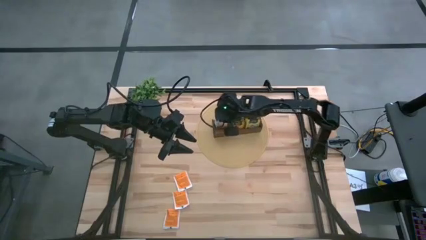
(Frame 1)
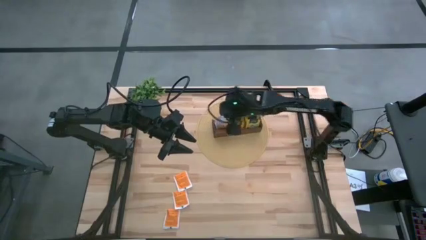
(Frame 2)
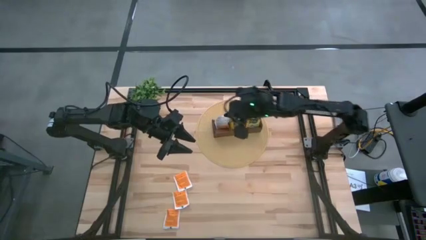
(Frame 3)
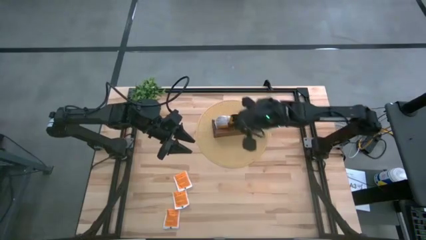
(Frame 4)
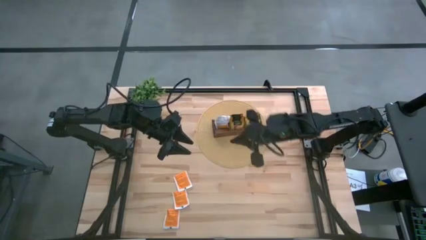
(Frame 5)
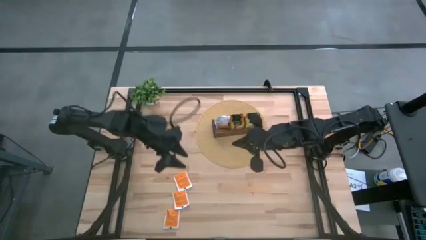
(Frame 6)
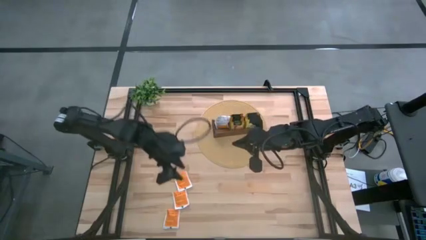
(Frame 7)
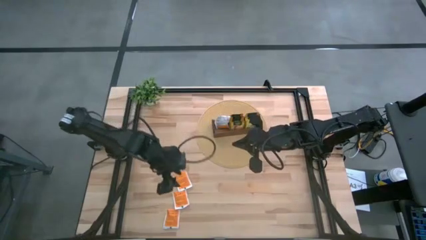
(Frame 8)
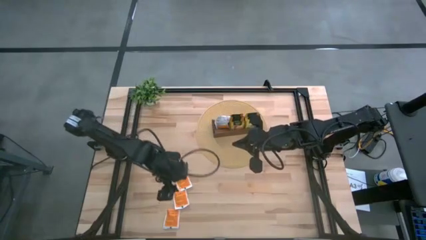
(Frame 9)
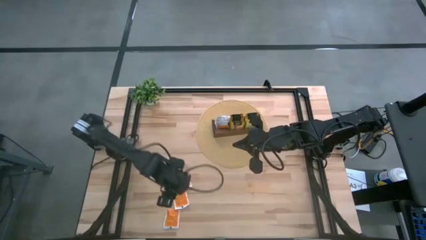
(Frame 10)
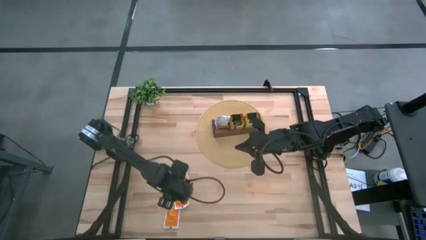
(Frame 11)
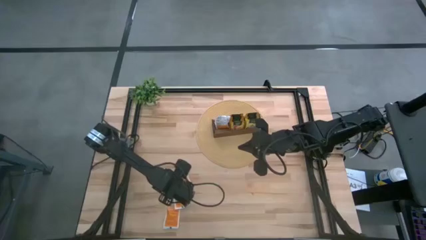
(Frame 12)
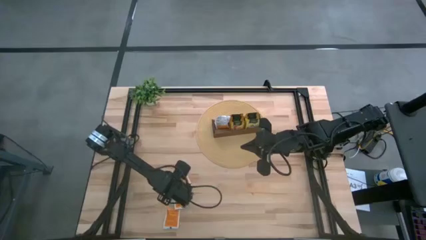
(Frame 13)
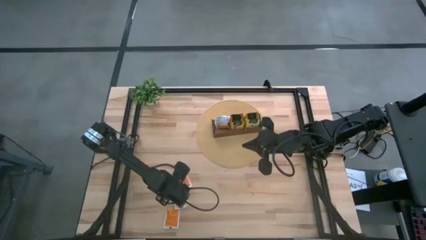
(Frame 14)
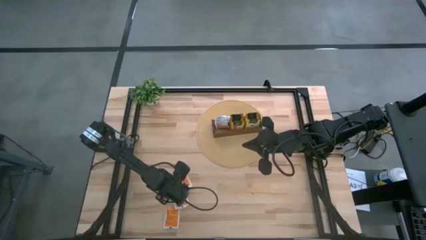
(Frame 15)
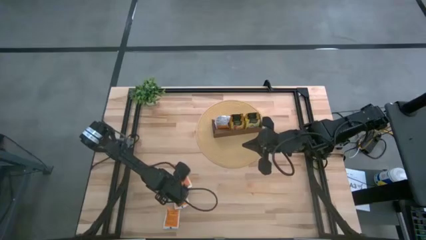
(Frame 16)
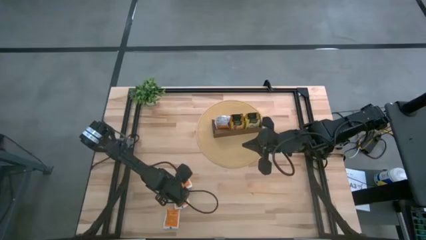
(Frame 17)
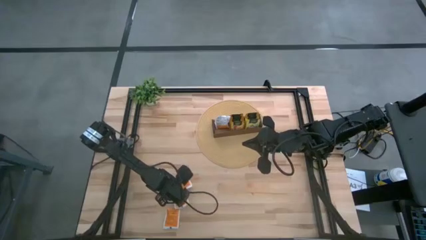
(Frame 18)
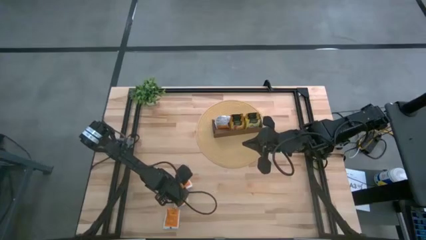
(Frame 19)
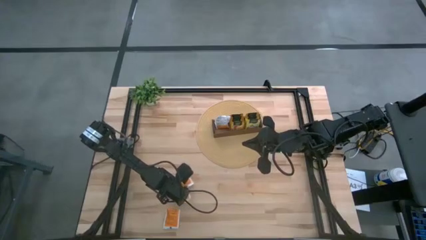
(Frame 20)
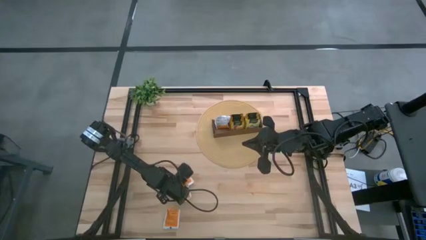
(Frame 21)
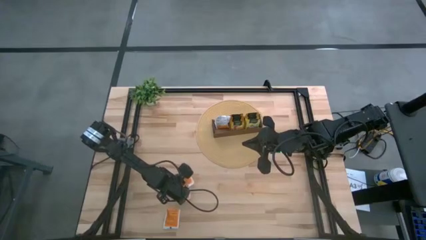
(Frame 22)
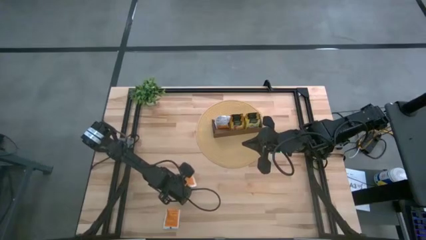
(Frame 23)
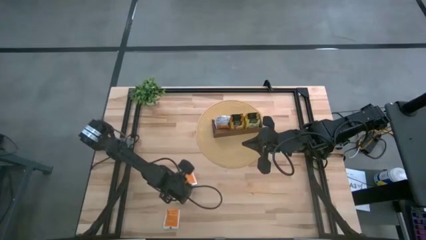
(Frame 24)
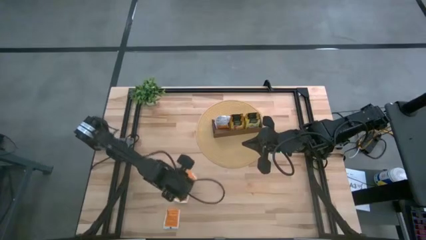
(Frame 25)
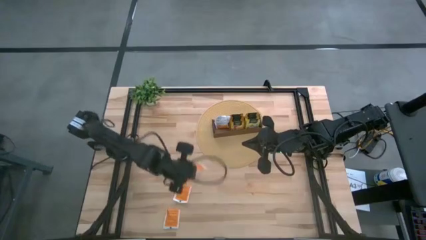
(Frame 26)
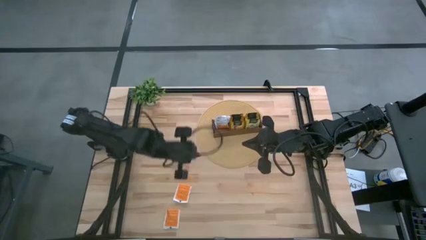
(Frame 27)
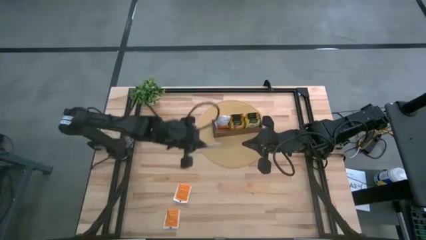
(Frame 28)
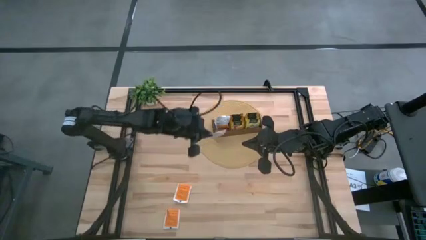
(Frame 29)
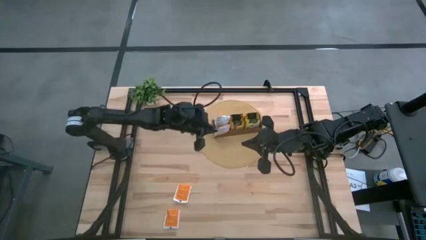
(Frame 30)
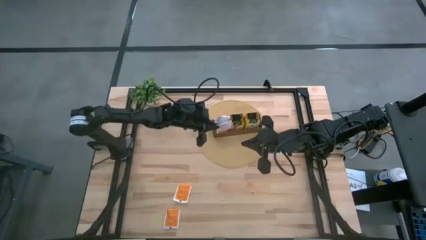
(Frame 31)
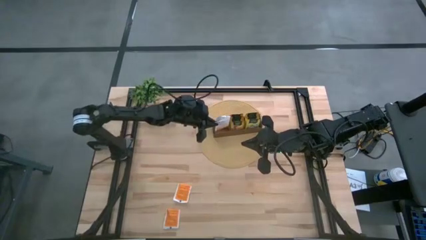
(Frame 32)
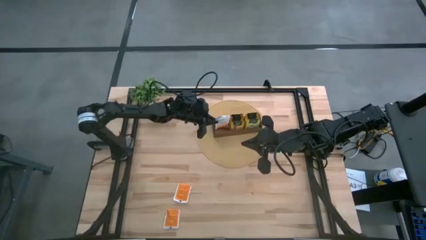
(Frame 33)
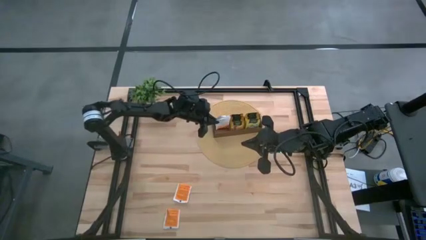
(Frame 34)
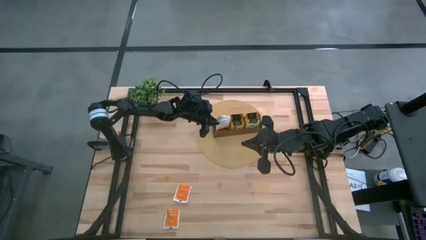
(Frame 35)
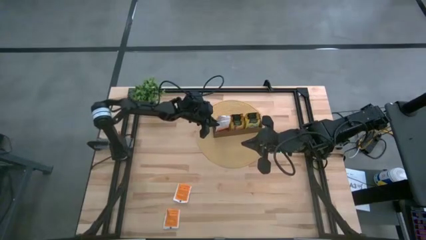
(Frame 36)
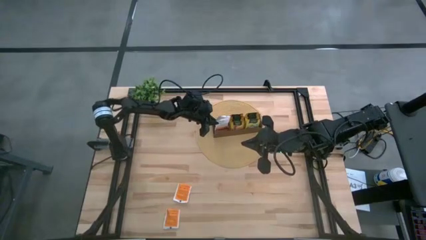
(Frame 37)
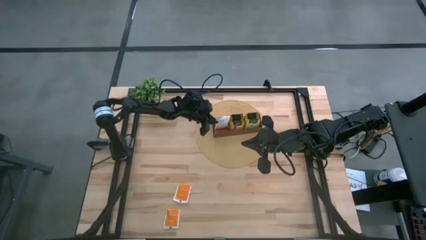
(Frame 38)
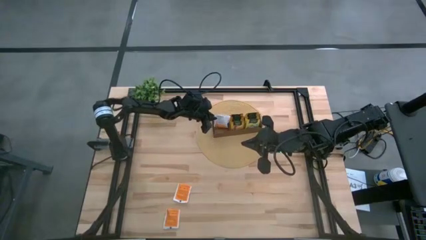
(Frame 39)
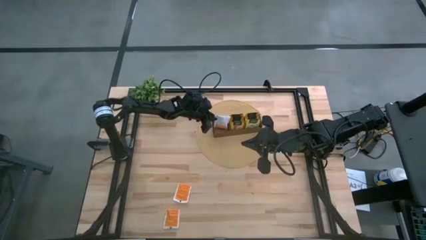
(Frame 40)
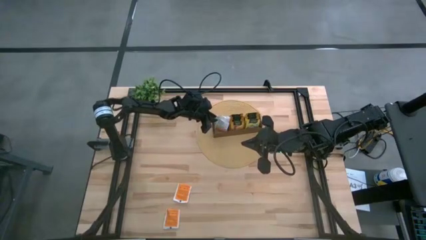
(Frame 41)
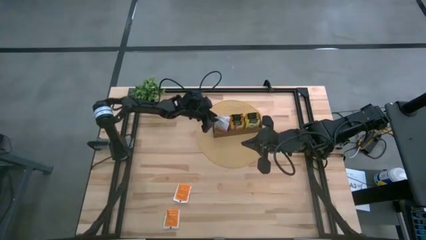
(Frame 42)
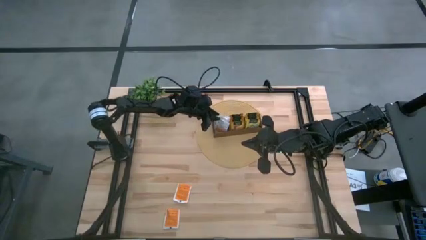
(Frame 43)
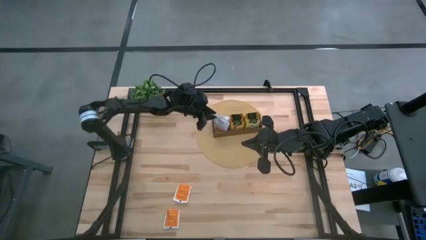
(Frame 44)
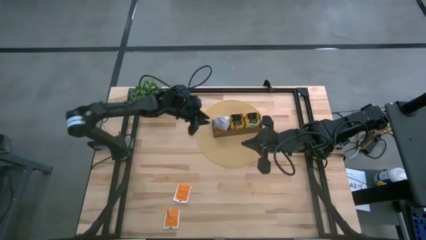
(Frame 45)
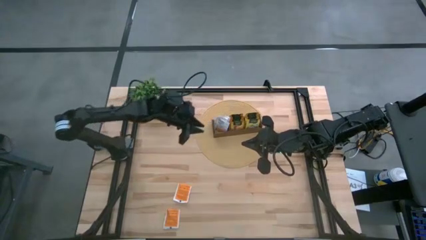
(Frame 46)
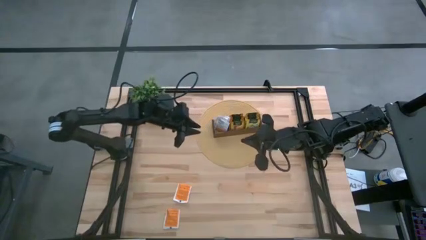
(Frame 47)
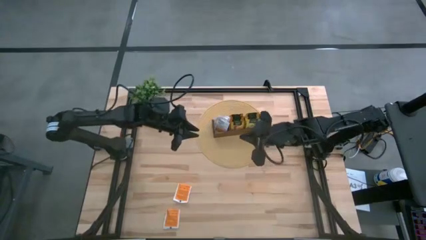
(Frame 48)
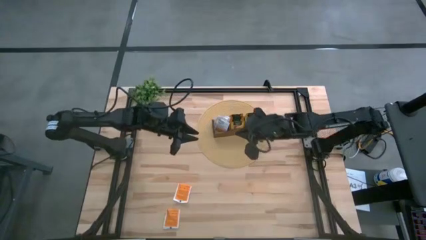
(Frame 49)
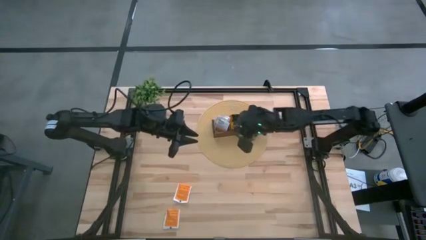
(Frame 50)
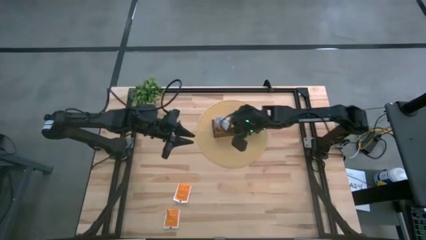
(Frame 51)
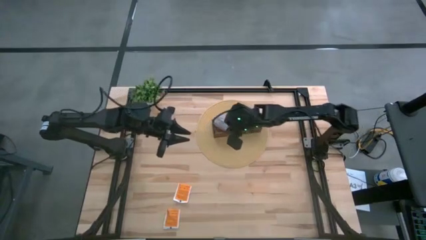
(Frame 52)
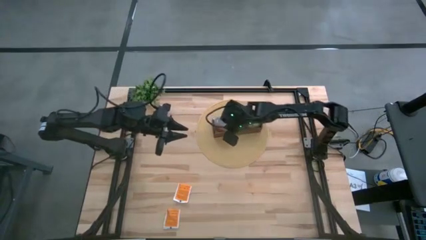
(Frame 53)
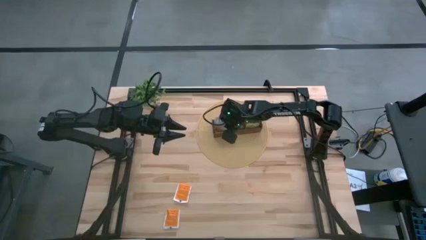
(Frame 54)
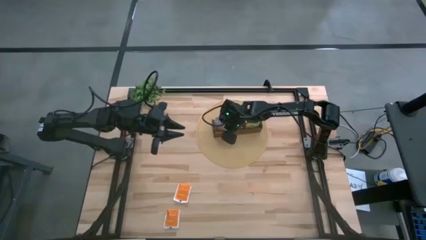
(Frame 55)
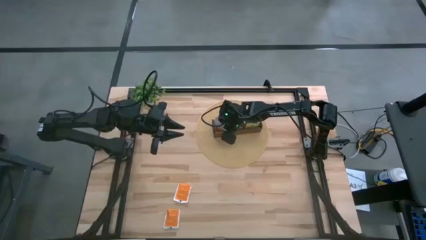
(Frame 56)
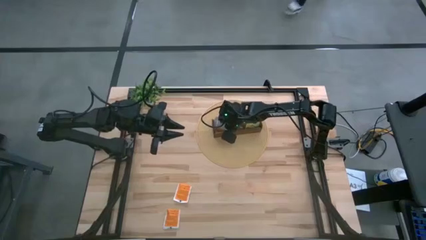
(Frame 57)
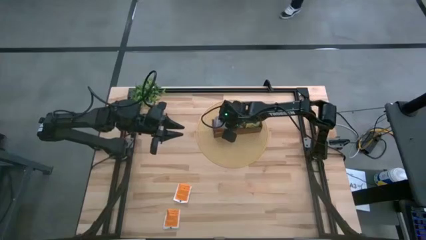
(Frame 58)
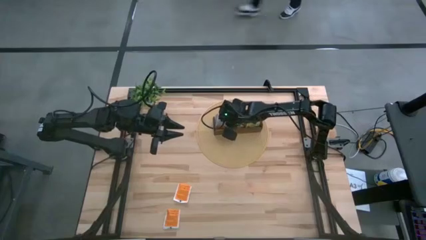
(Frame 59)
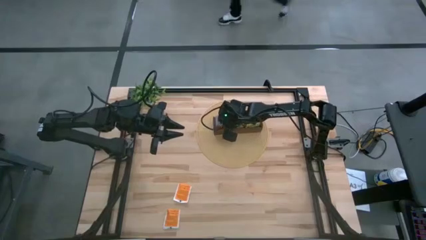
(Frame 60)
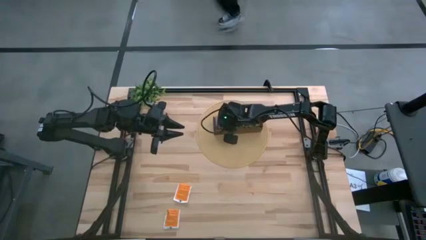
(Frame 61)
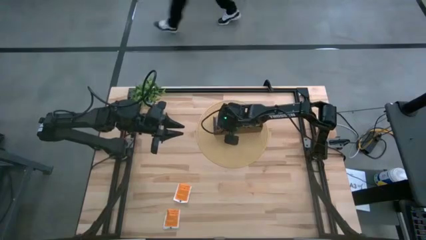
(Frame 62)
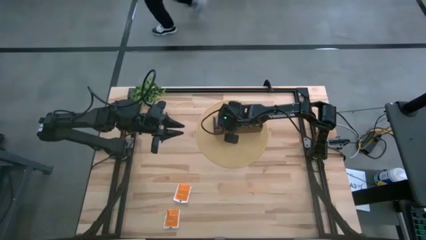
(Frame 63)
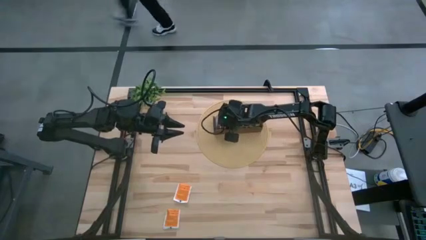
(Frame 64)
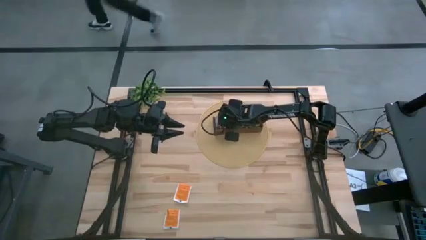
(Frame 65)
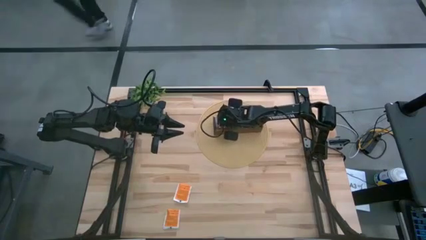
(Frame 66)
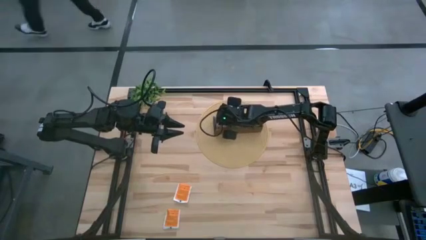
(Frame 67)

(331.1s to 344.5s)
Task: Pick & Place Tea
Put the top white tea bag into the left section of the wooden organizer
